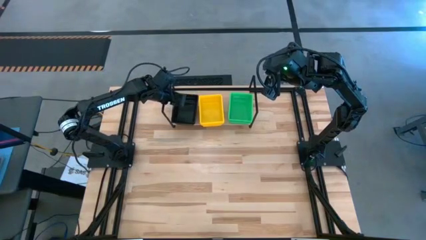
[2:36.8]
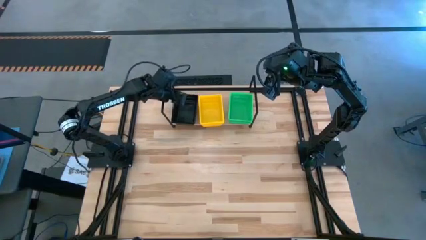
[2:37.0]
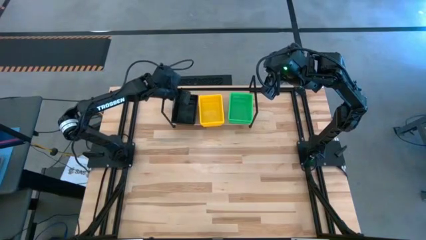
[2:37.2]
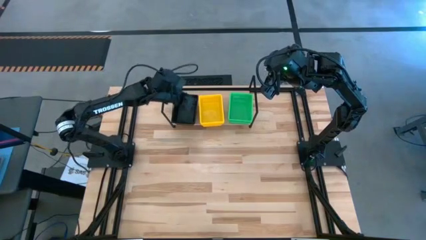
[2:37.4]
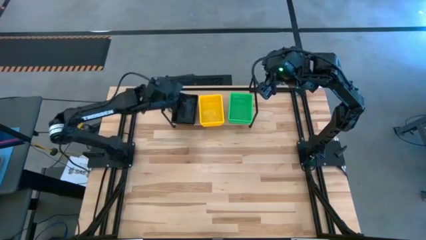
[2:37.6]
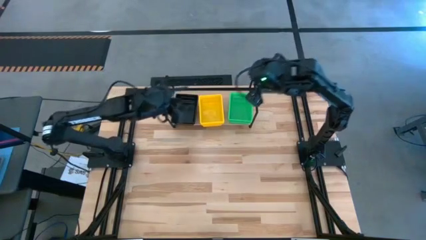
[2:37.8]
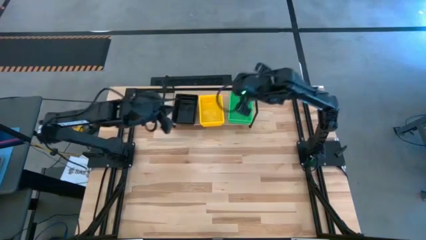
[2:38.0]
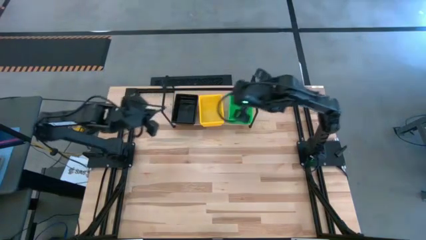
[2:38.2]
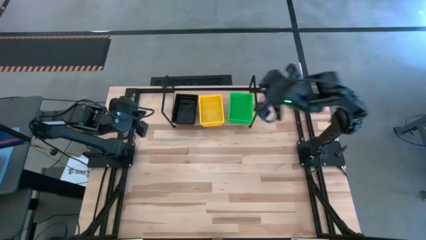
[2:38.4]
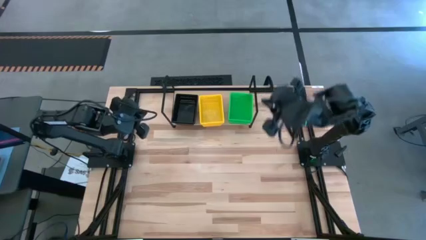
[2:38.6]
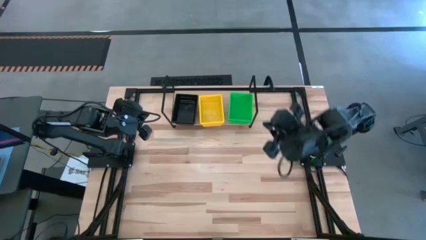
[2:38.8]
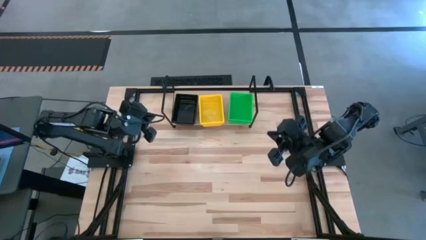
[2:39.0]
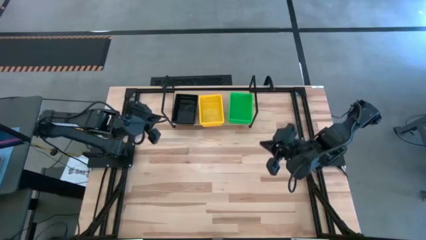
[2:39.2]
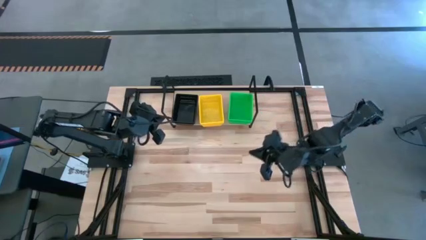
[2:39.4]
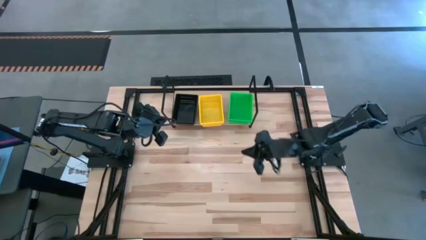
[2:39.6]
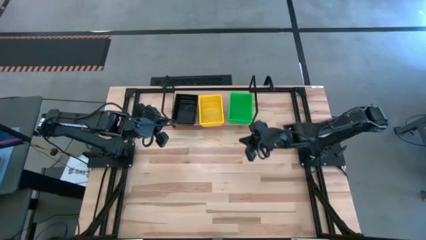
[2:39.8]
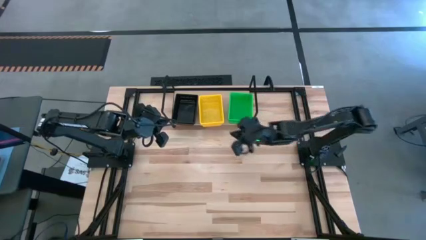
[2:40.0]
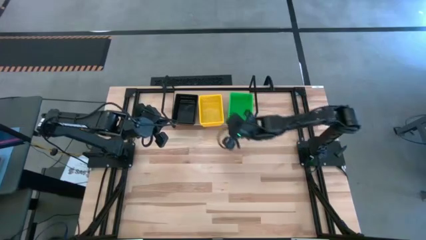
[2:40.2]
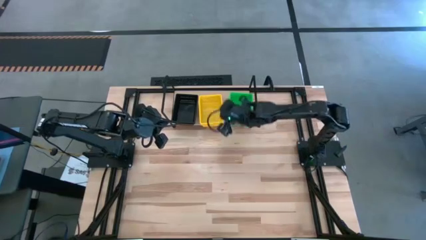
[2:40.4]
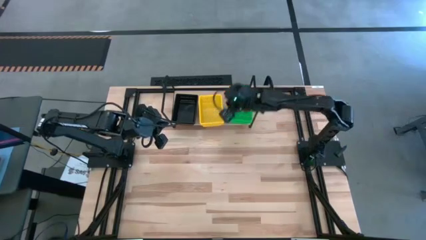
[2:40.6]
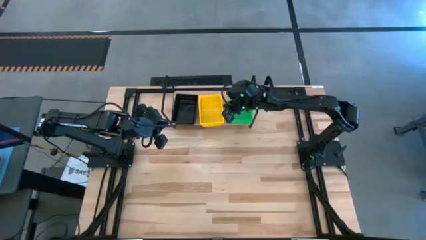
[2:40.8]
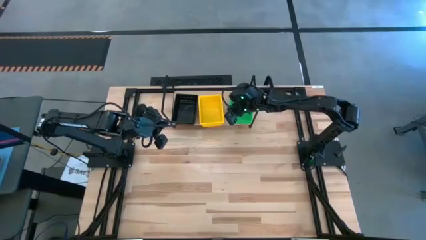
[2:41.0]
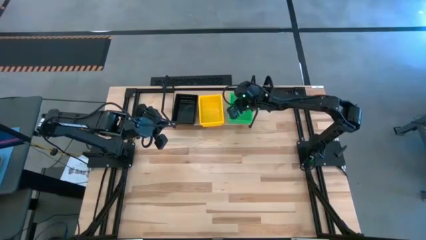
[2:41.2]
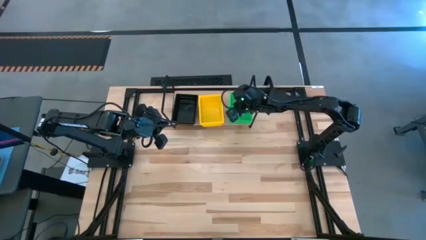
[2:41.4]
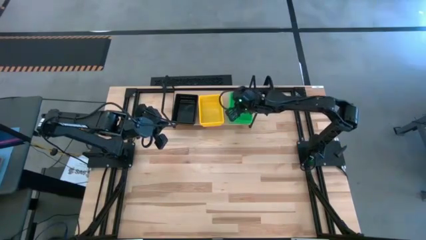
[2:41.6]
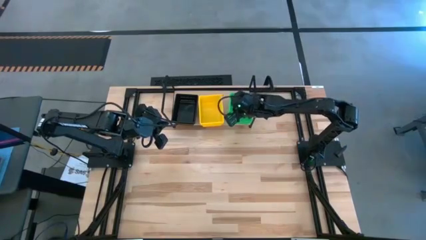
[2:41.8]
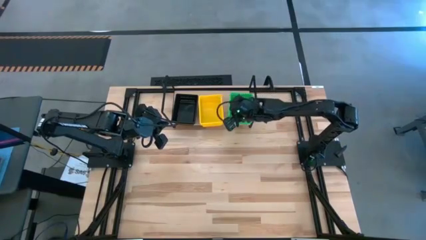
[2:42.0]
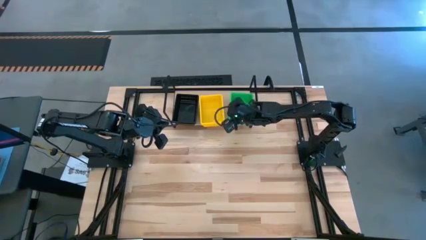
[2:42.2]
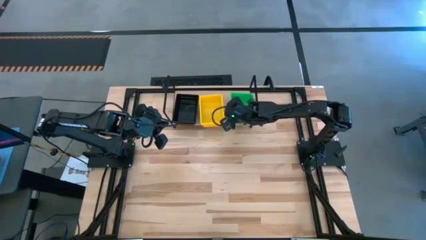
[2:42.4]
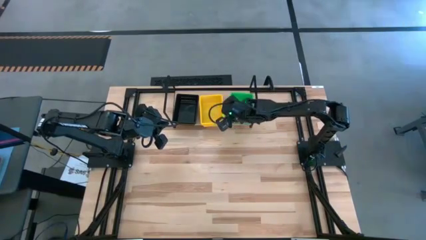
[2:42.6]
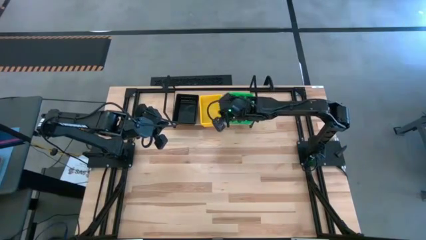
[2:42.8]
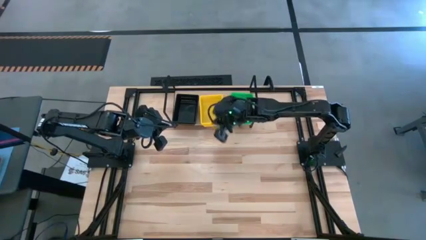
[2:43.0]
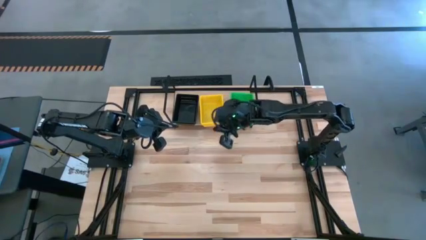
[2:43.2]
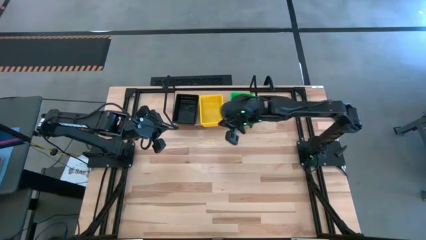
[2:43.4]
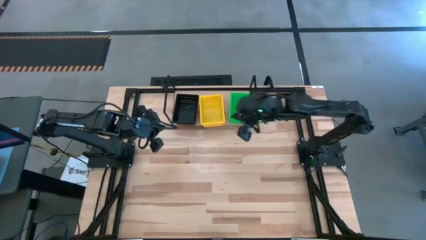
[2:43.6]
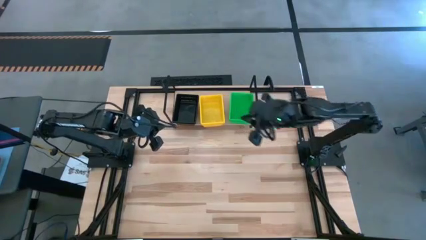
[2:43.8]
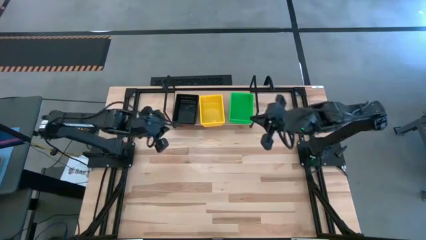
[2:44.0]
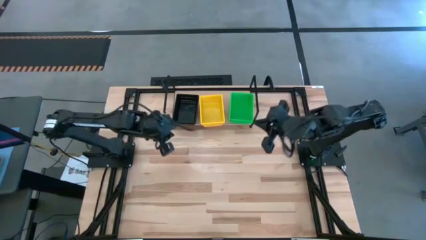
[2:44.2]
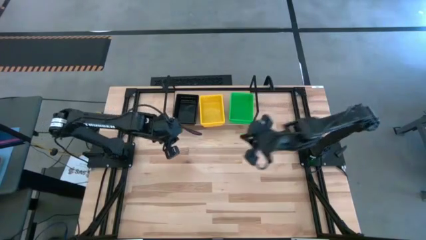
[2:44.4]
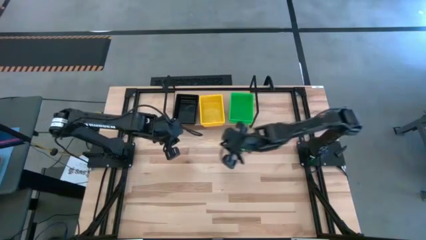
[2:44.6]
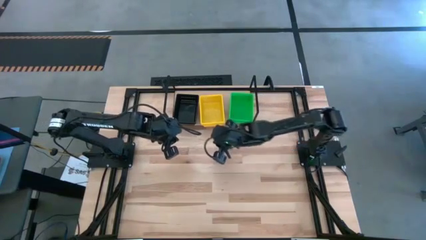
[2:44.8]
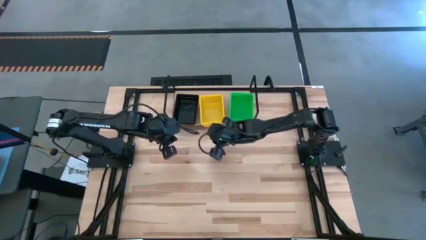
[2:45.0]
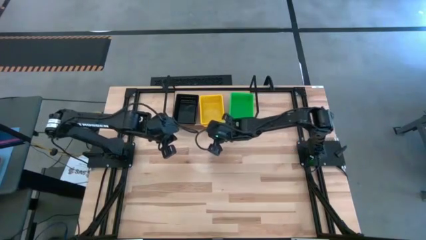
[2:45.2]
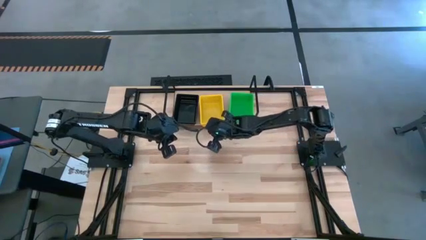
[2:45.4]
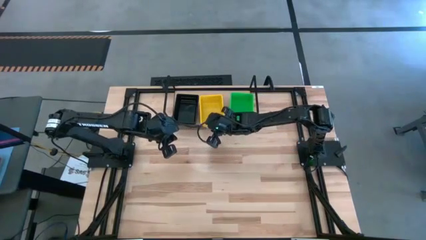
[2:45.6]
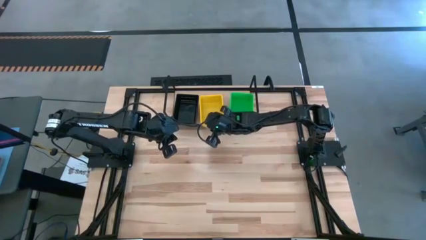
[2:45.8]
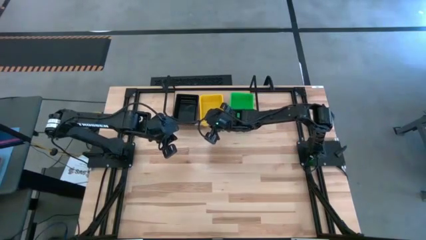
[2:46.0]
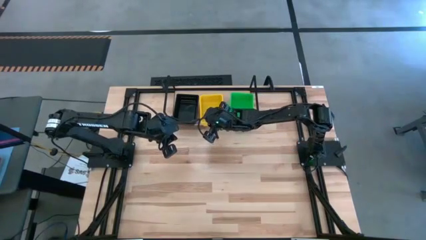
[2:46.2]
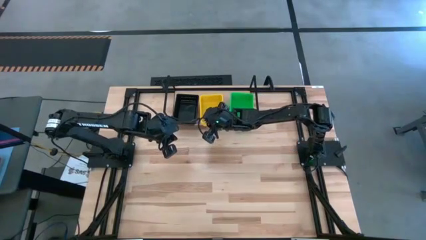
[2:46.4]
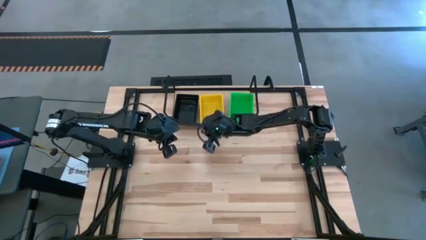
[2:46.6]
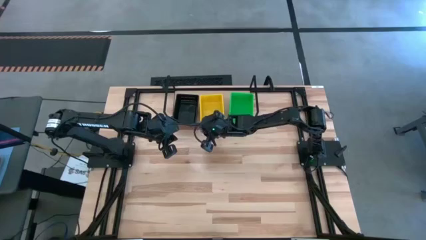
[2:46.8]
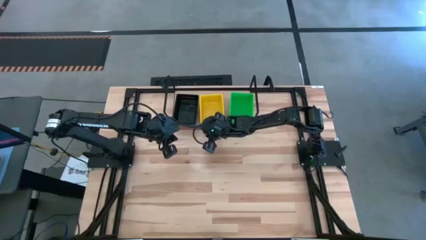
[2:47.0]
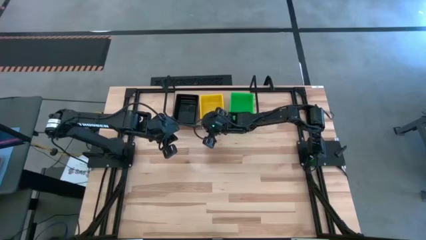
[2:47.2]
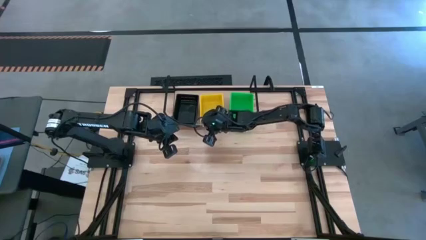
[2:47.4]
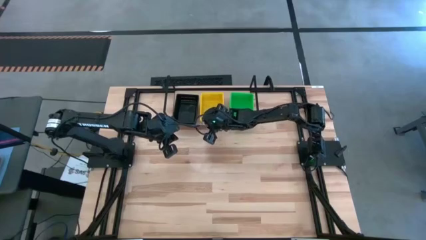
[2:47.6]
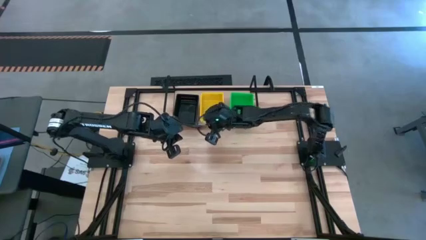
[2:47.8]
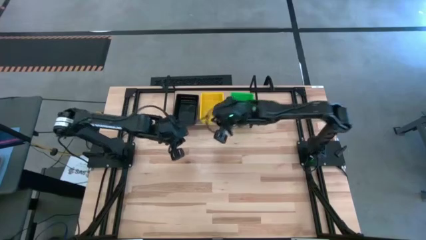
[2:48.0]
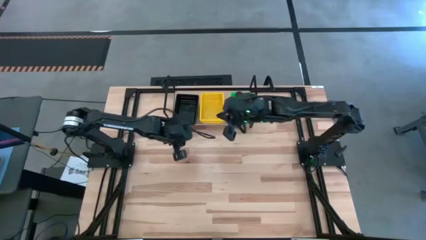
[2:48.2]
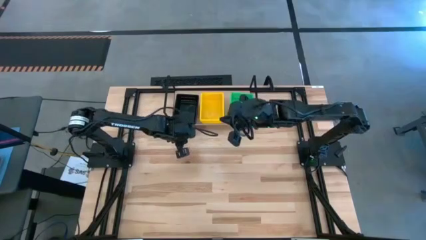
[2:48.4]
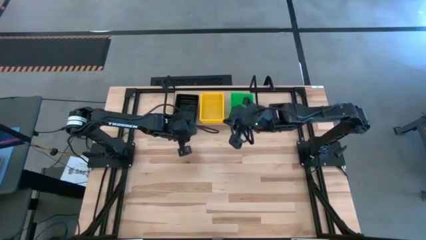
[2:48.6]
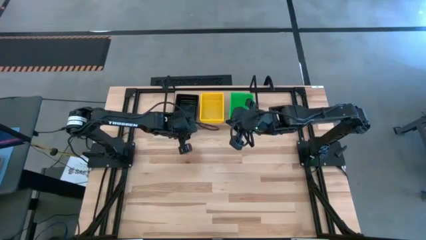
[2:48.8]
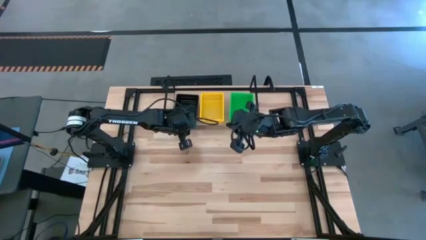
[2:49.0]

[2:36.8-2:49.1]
Task: Stack baskets on shelf by color
Return to Home Position

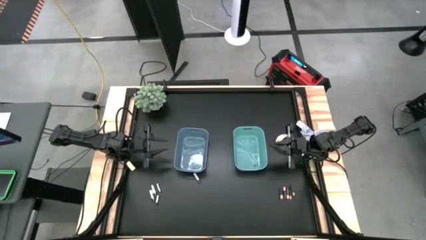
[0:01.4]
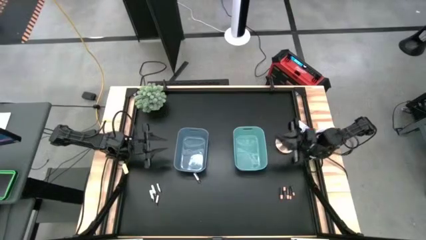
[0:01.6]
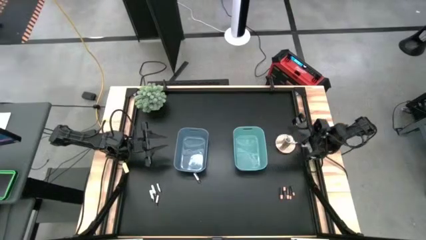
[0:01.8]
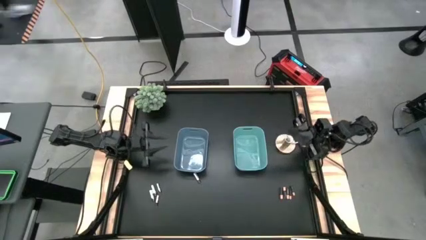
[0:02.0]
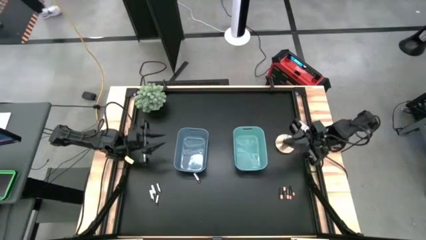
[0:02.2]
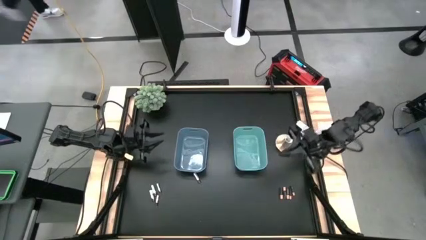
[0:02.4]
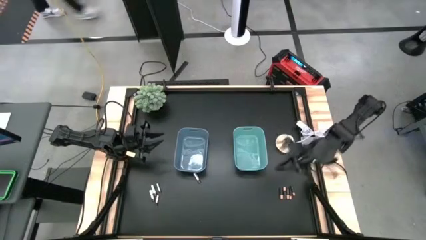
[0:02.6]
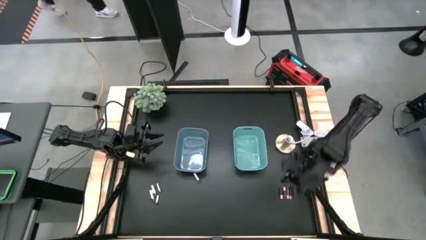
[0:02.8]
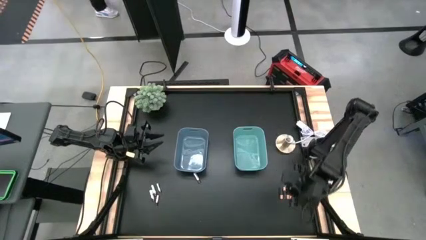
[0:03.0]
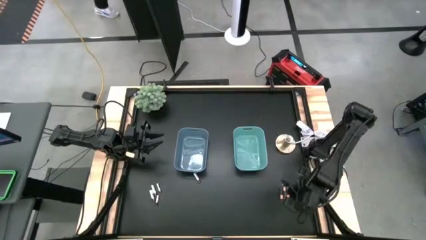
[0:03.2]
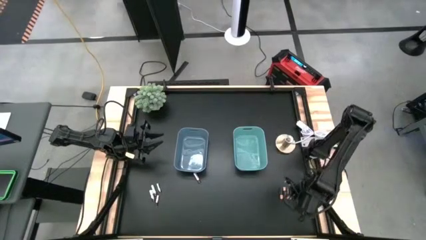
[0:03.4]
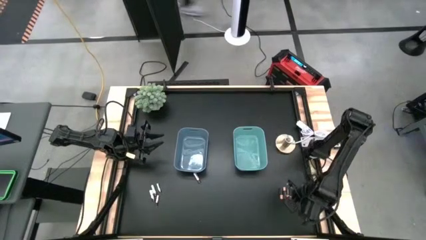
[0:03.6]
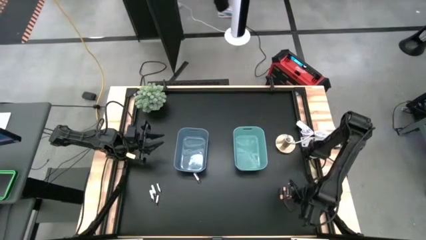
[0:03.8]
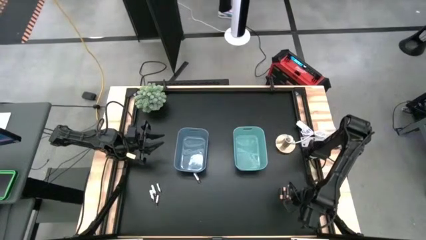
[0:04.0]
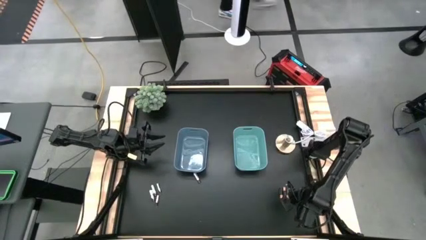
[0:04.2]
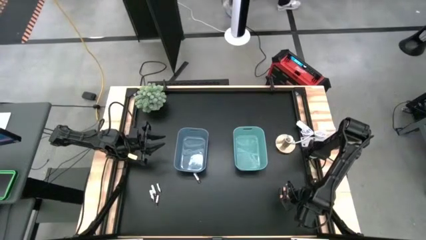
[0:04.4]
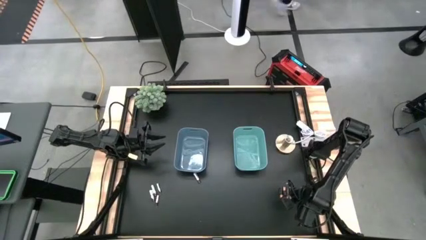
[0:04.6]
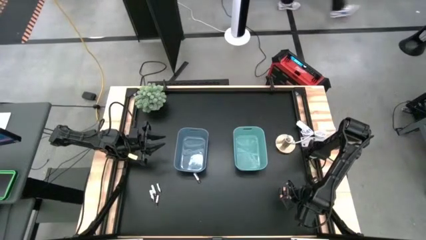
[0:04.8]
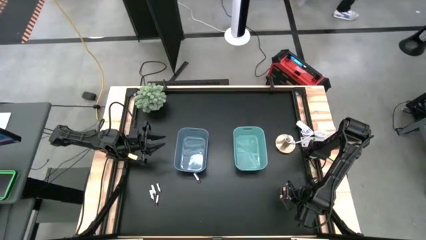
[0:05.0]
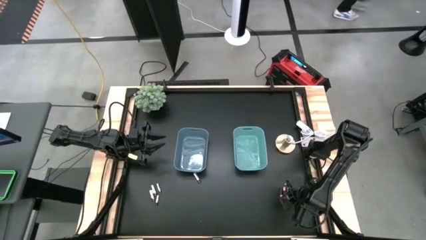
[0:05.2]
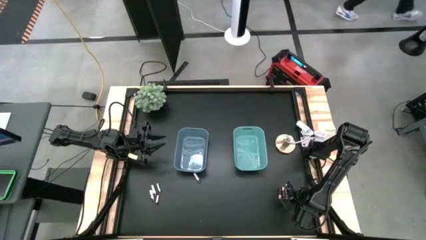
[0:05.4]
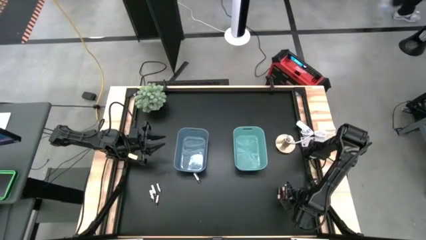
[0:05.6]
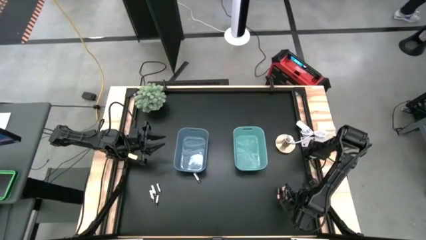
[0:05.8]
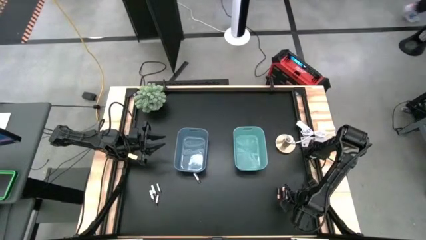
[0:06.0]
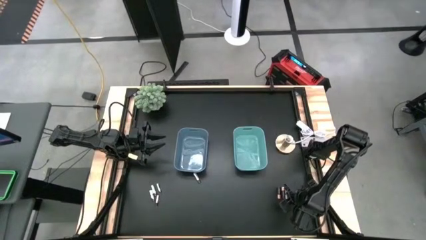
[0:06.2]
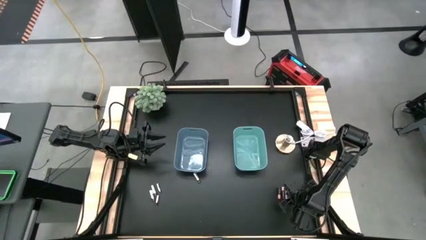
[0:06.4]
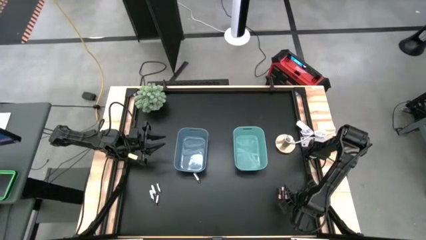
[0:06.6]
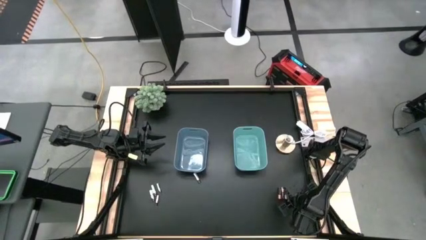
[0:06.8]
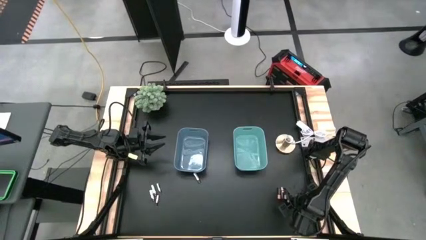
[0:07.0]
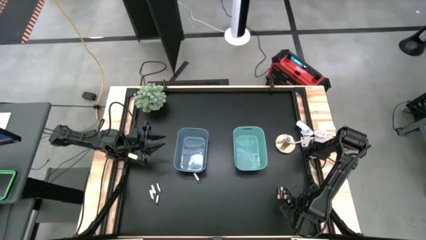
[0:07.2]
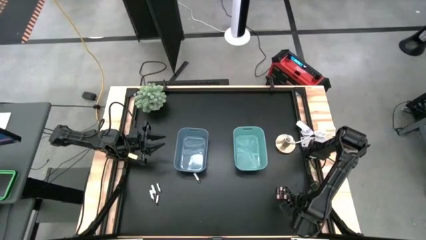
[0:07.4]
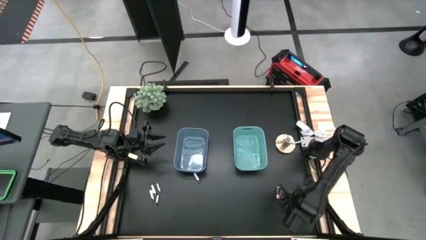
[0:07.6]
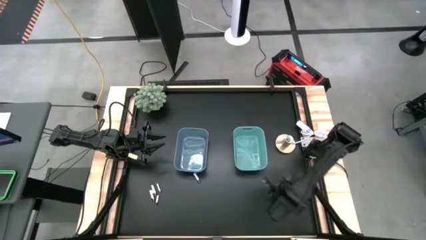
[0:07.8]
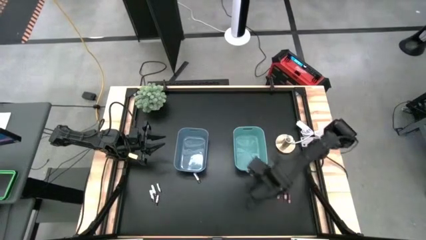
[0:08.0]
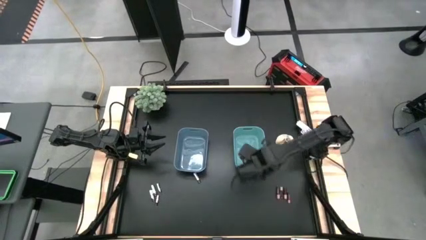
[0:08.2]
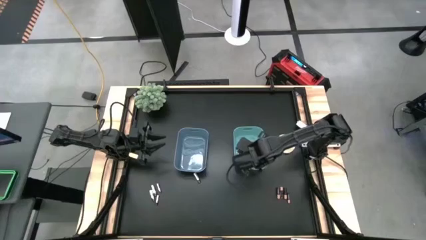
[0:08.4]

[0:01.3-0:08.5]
Task: Sort batteries
Put the small black battery into the green bin
